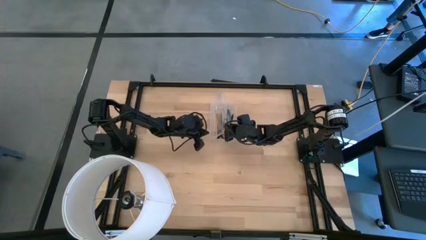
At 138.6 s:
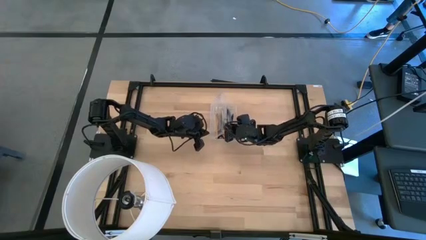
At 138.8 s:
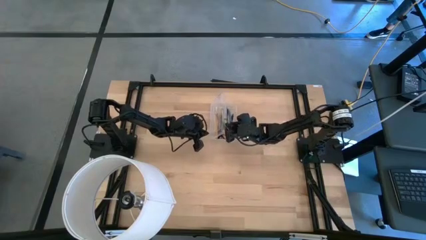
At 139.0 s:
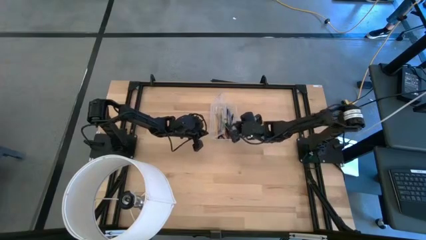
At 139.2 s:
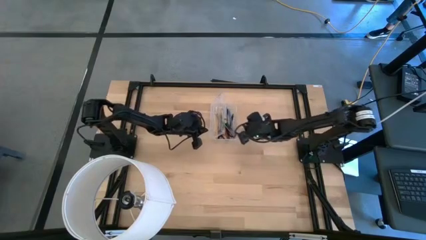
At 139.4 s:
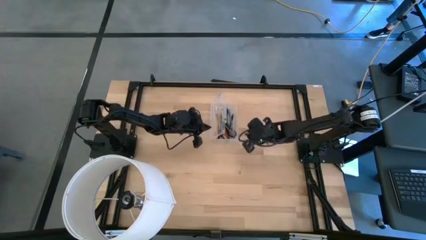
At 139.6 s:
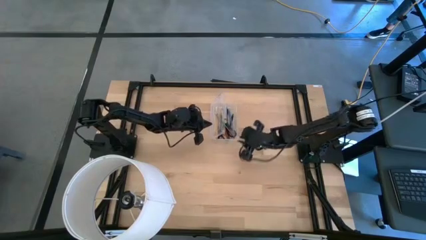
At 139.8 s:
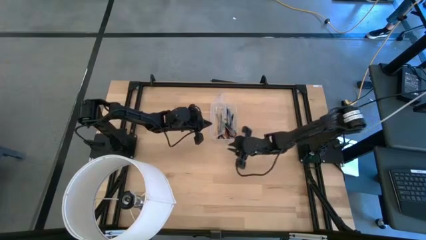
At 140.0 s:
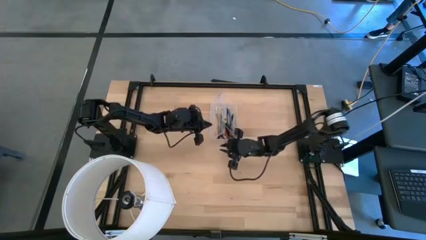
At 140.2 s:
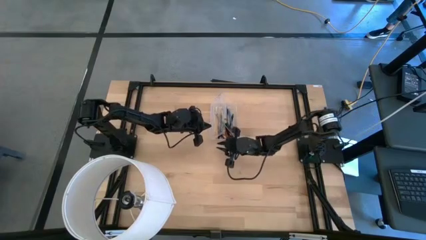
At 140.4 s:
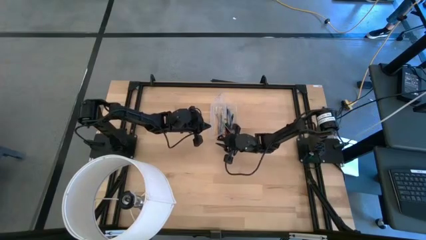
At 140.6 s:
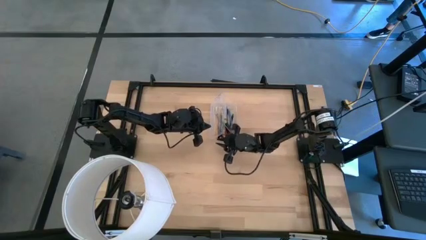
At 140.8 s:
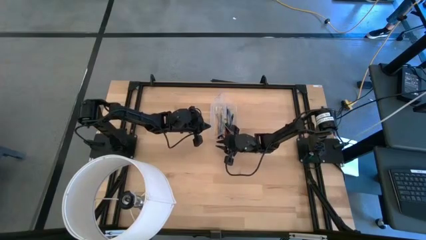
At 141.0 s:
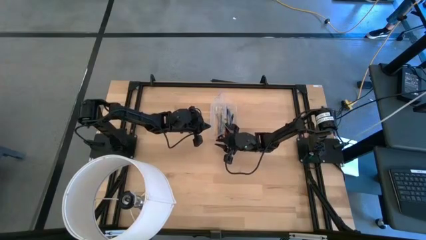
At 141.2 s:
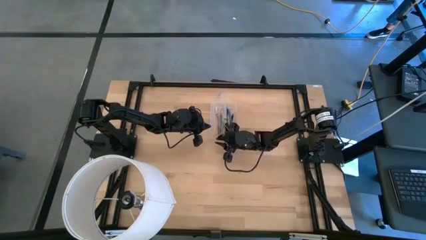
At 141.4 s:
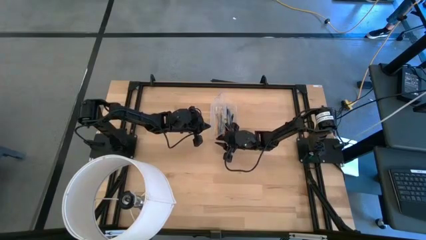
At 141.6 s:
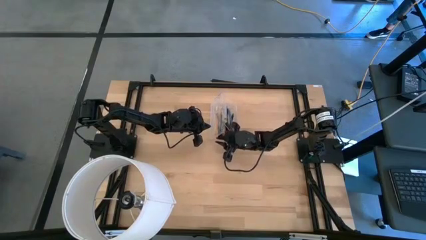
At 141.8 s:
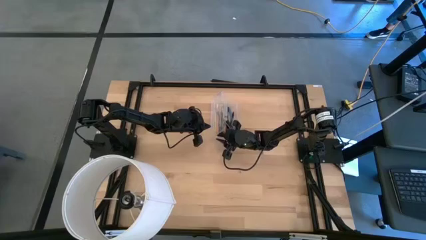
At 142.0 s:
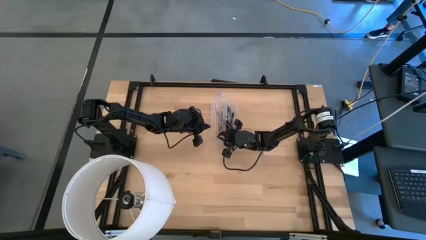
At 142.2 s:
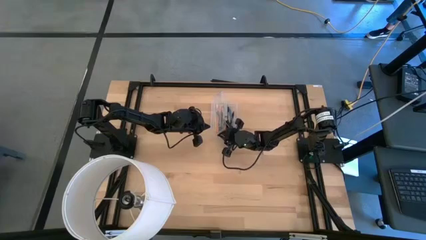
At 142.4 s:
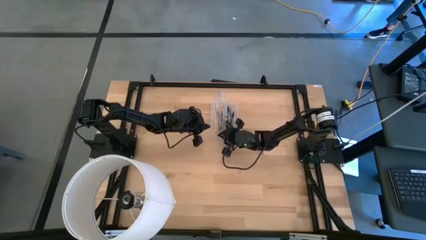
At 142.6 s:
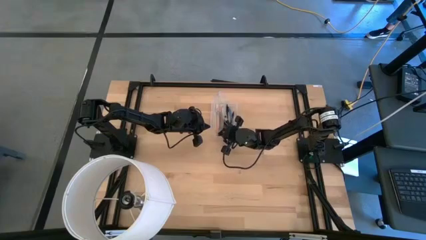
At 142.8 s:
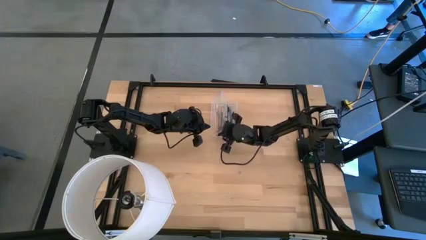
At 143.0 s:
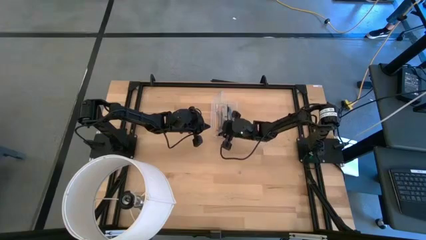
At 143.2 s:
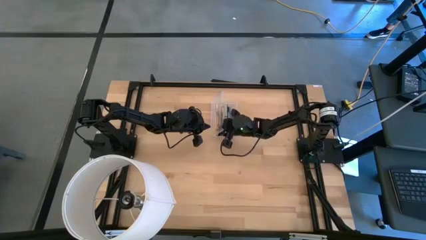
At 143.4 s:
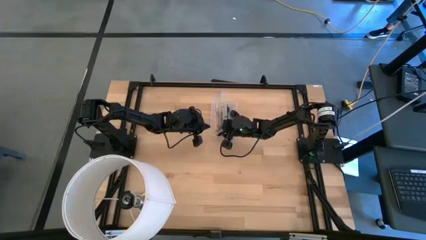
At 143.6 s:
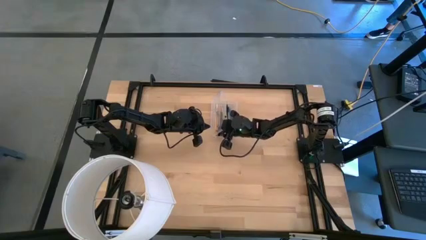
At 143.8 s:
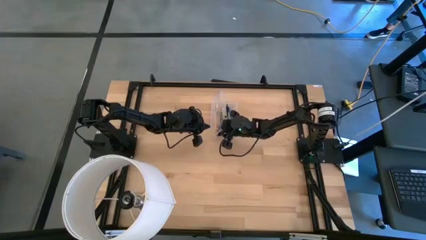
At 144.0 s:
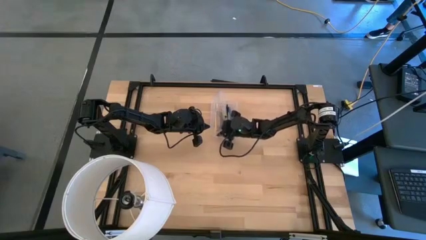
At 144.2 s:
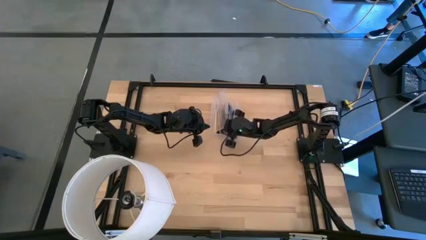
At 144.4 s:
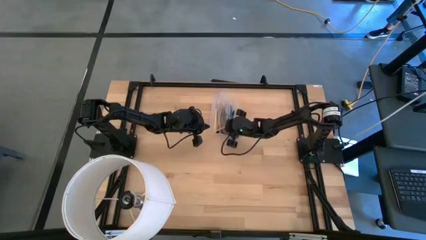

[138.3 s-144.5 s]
Task: Pick & place school supplies into a supply box
Adjust the orange pencil on the transparent supply box

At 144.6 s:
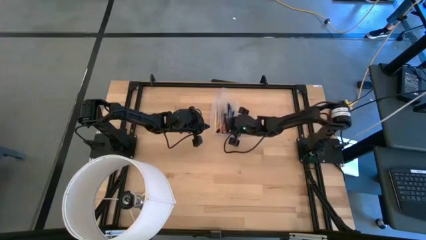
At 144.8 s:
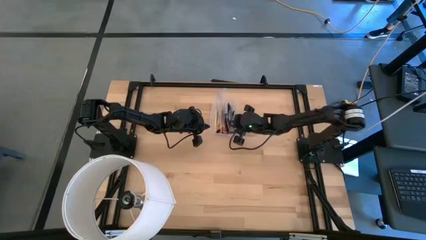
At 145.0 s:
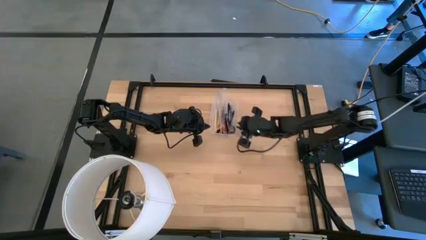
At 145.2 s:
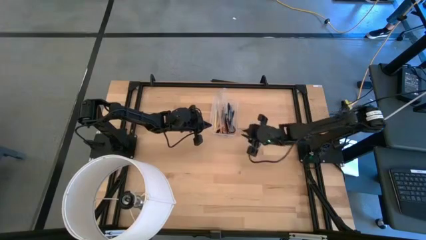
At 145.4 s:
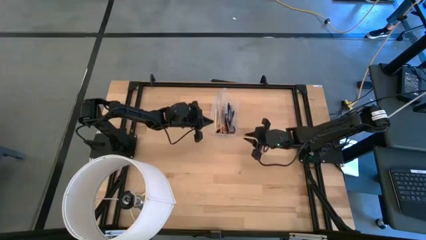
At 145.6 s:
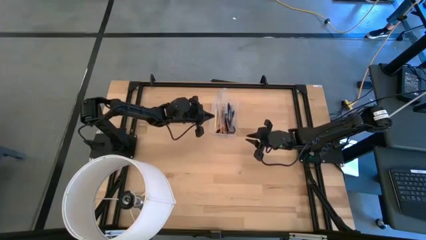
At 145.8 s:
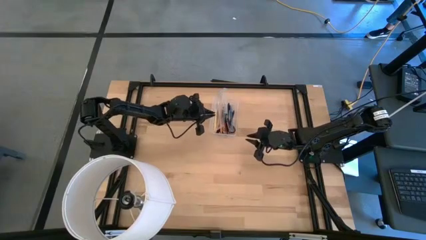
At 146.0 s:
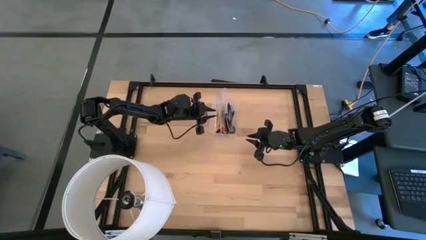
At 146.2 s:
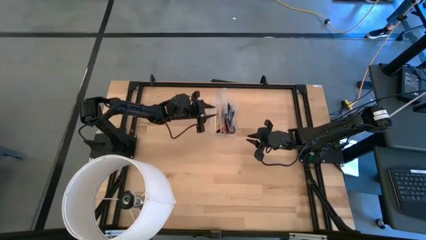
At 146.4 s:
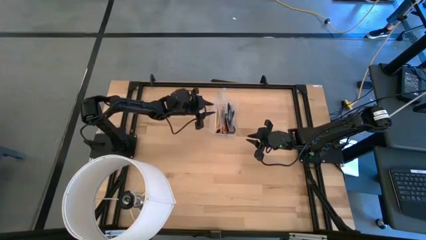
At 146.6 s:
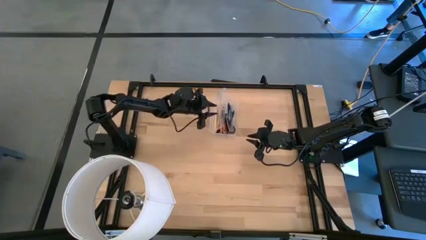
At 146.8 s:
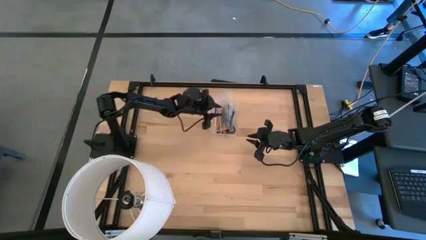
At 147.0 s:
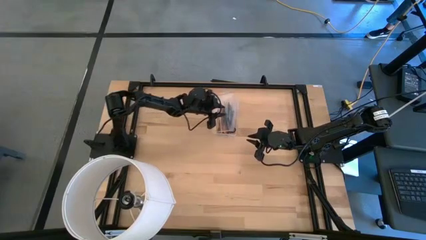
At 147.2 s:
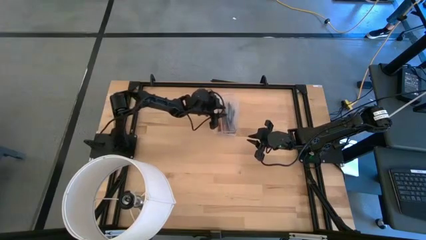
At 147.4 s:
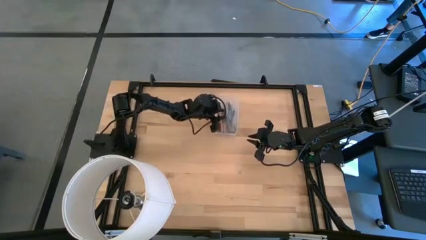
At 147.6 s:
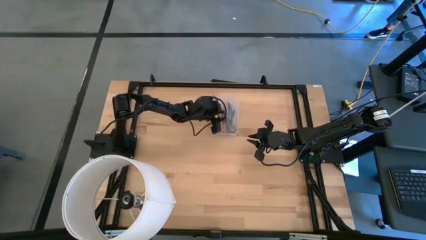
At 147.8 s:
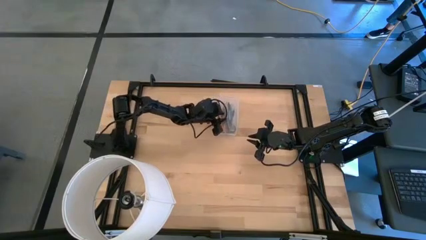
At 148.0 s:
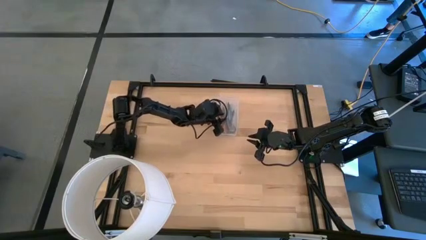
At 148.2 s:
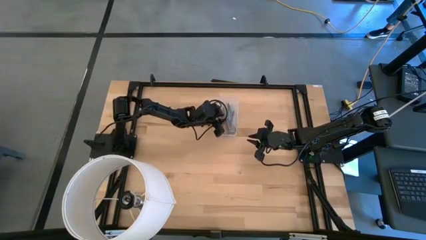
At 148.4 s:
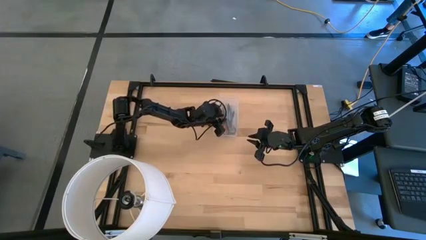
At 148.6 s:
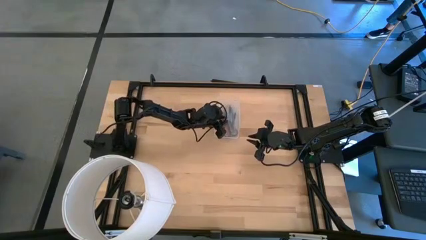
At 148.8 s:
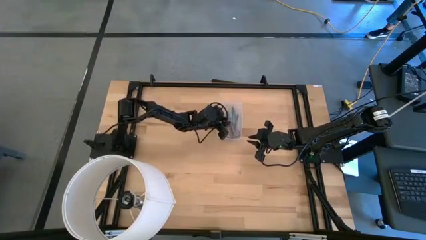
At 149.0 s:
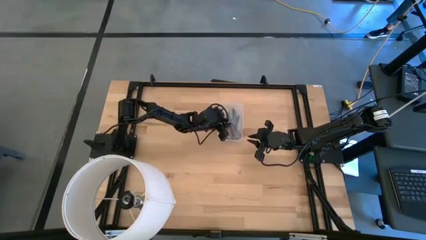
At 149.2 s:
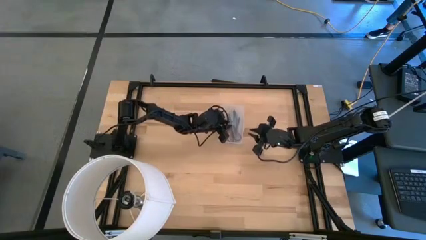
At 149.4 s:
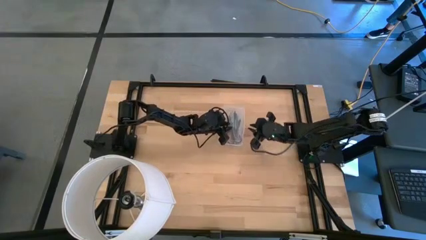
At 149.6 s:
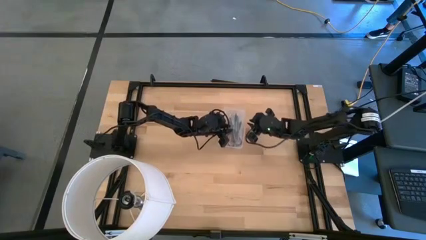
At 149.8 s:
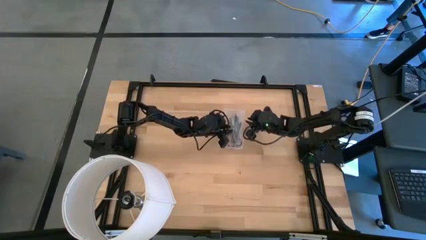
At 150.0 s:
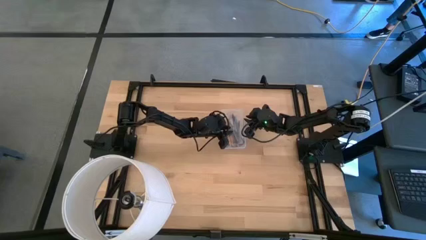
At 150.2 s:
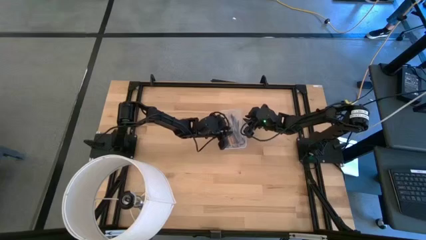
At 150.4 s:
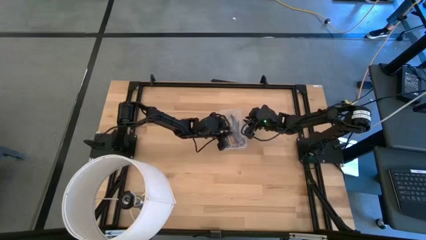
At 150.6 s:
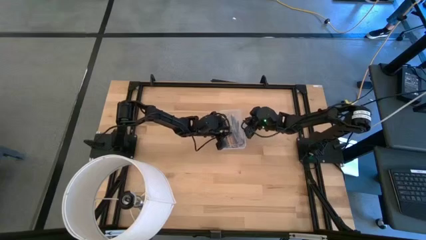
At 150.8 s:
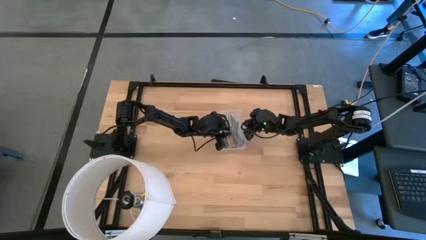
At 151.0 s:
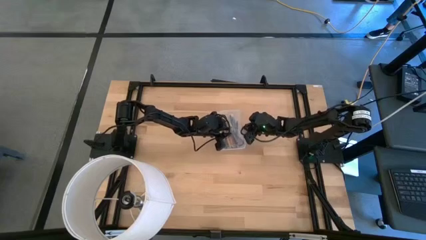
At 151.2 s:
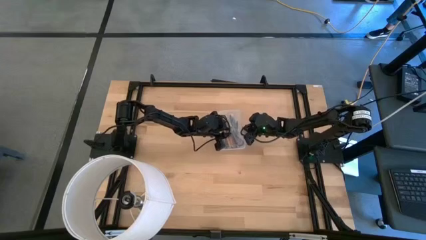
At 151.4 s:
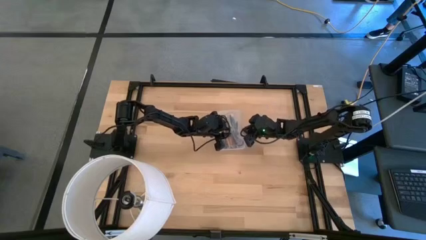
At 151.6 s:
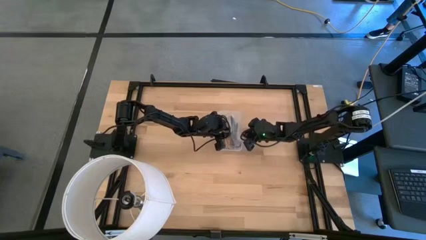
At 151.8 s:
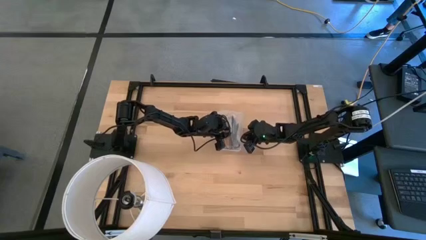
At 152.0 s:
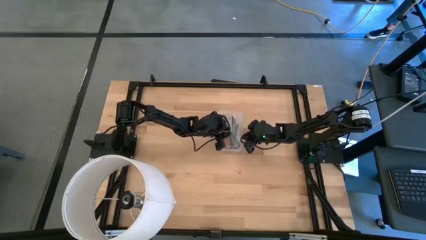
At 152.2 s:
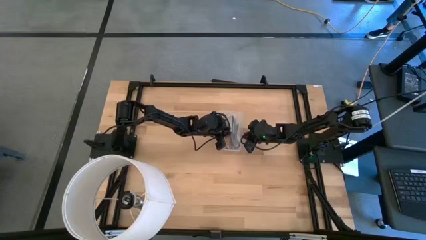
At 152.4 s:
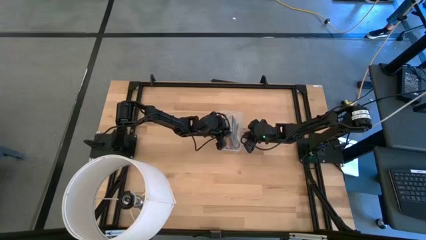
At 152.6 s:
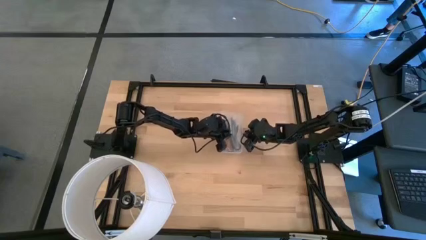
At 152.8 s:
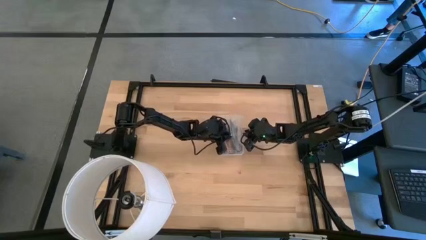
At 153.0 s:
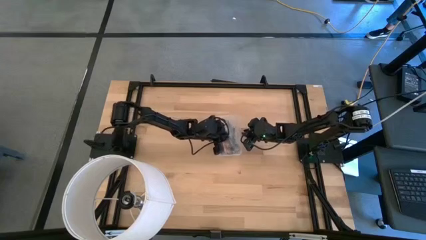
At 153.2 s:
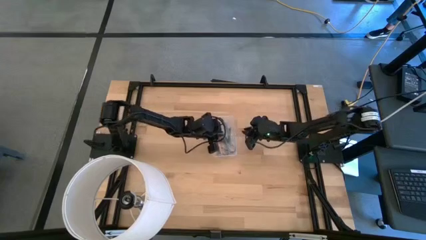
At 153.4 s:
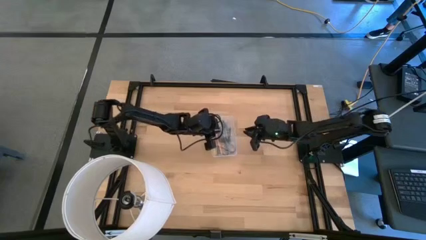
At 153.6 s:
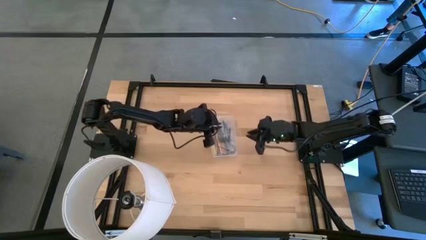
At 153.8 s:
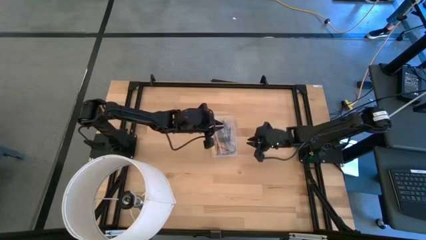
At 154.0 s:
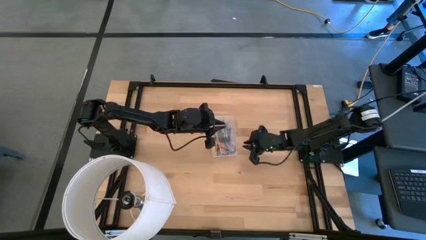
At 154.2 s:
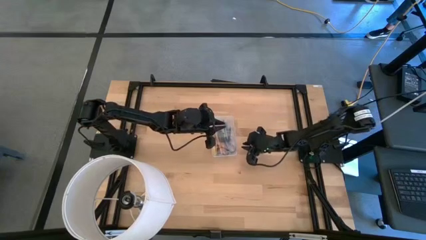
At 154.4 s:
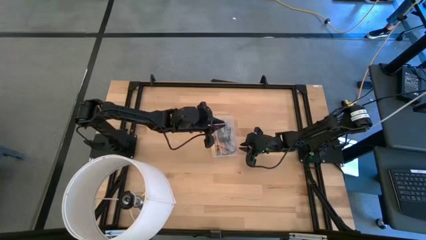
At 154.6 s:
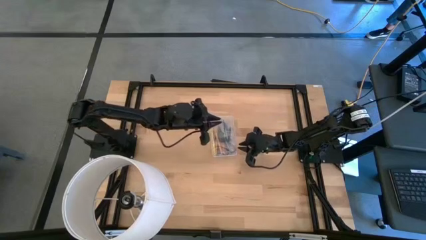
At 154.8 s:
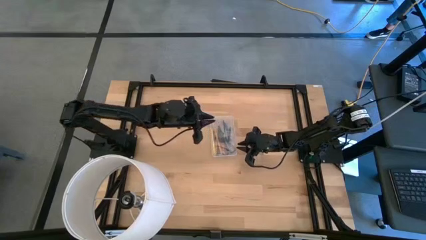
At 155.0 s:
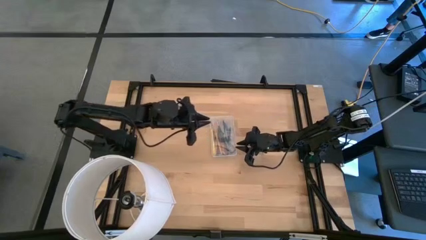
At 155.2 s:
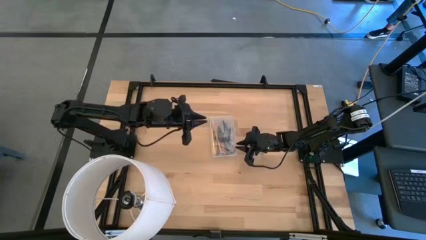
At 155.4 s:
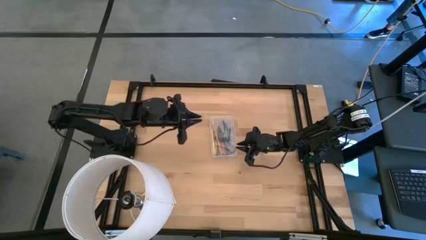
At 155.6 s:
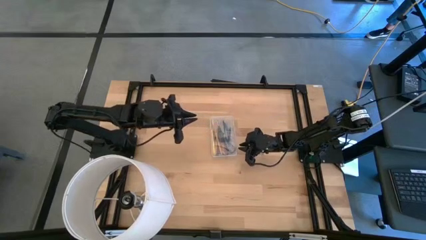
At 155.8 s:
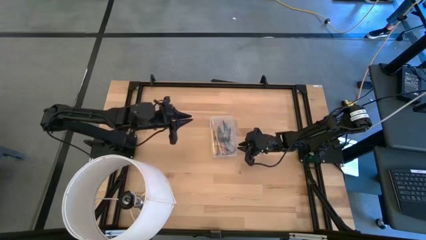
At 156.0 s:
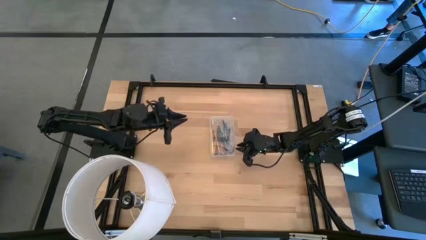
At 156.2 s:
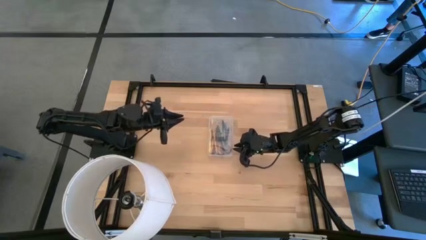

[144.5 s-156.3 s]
Close the transparent supply box
